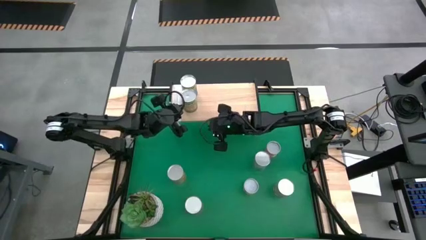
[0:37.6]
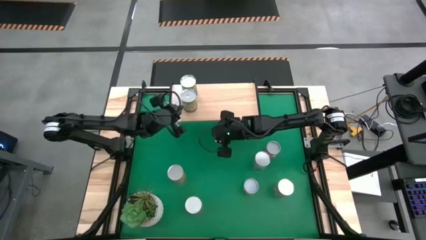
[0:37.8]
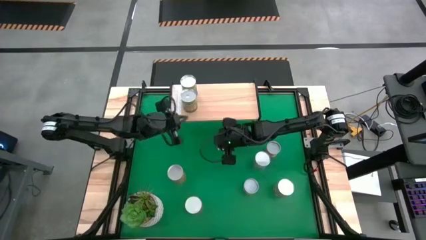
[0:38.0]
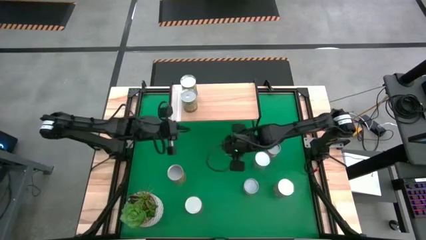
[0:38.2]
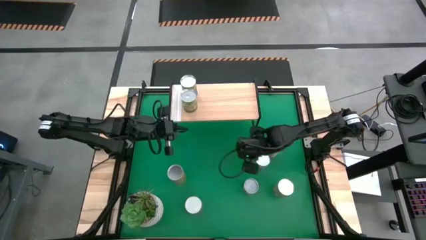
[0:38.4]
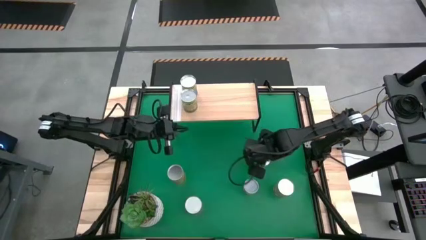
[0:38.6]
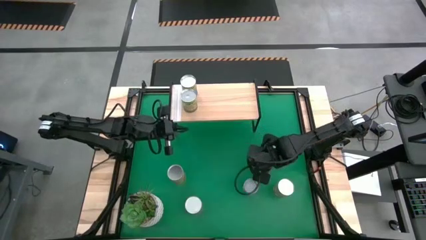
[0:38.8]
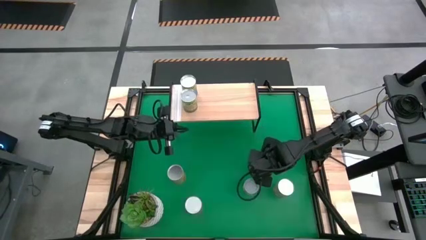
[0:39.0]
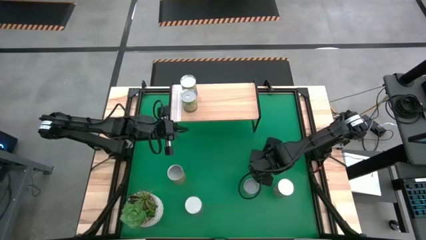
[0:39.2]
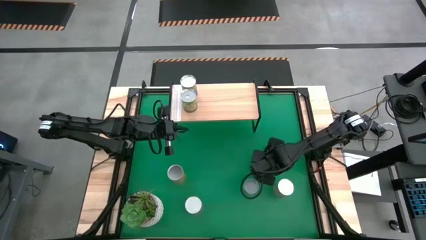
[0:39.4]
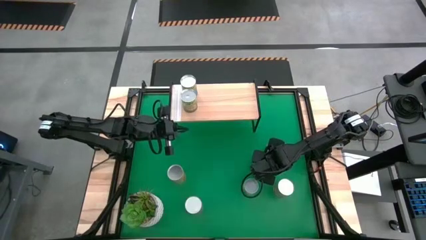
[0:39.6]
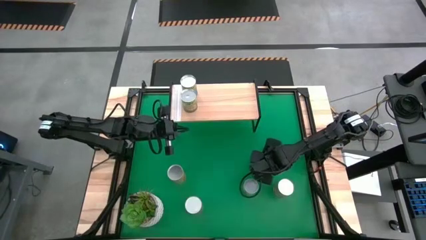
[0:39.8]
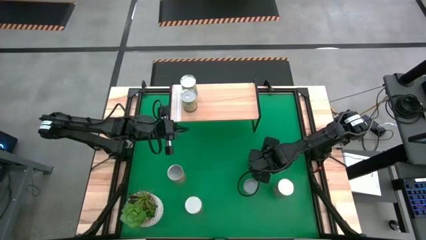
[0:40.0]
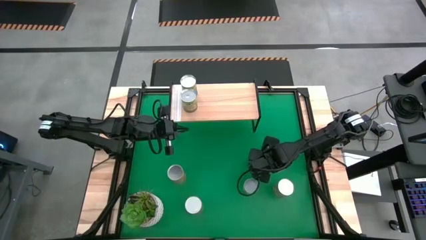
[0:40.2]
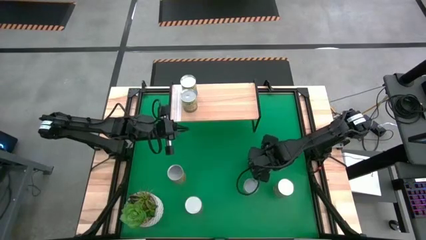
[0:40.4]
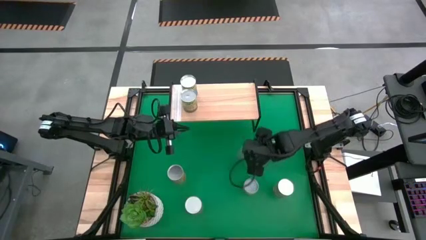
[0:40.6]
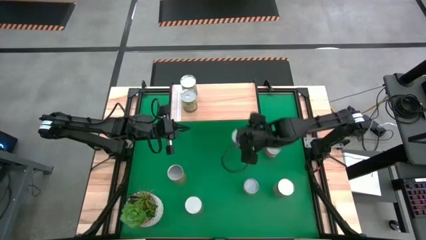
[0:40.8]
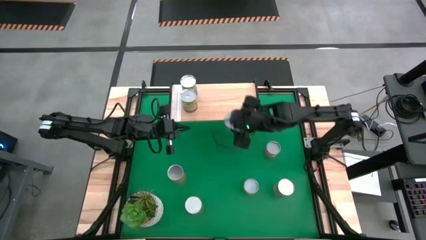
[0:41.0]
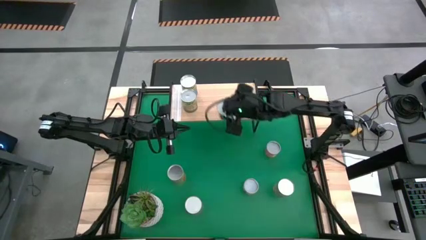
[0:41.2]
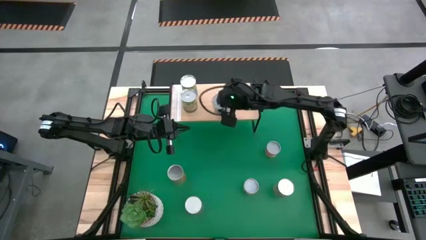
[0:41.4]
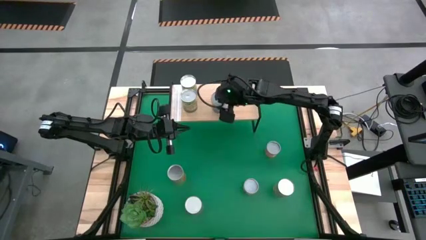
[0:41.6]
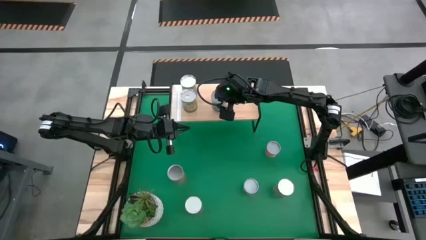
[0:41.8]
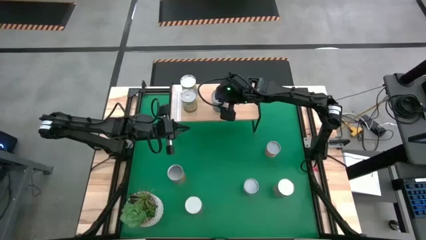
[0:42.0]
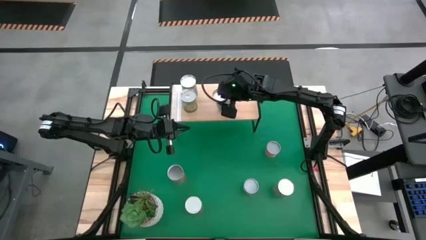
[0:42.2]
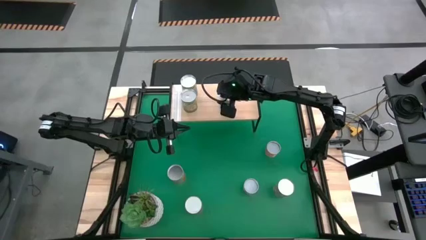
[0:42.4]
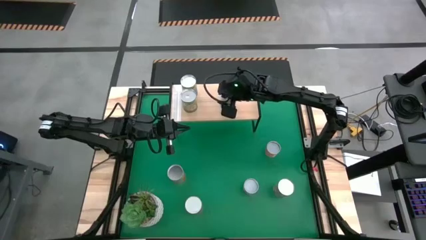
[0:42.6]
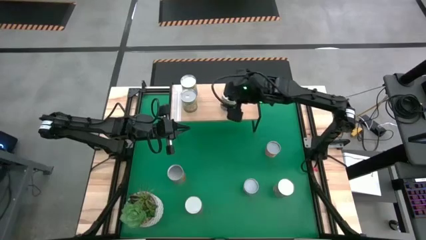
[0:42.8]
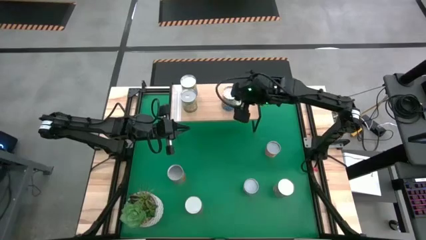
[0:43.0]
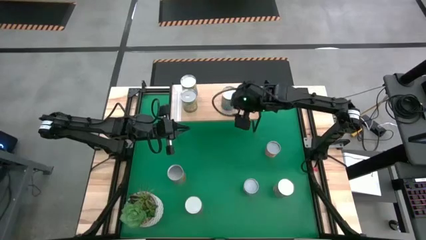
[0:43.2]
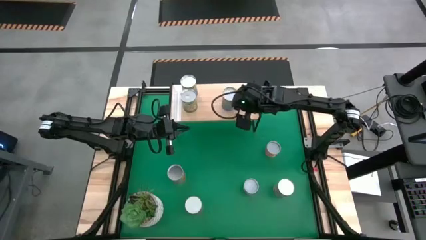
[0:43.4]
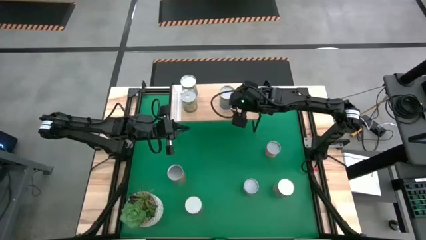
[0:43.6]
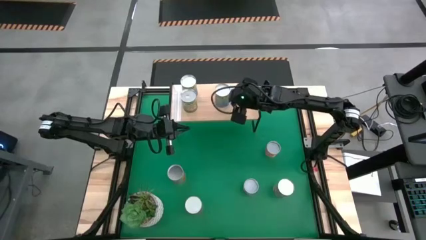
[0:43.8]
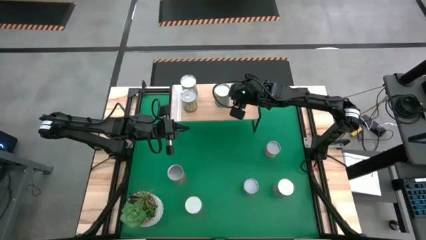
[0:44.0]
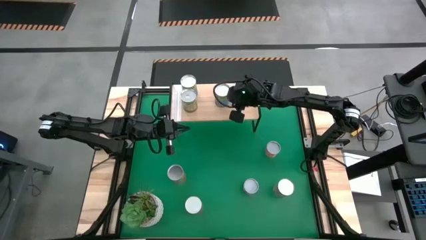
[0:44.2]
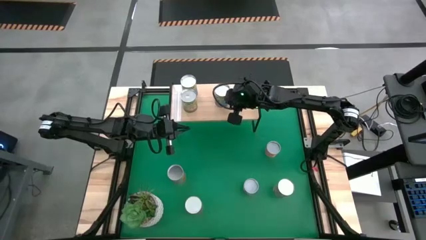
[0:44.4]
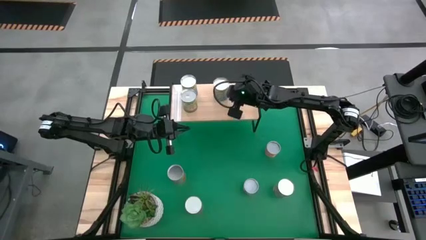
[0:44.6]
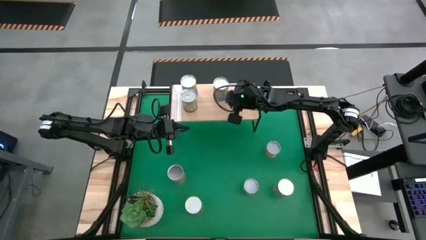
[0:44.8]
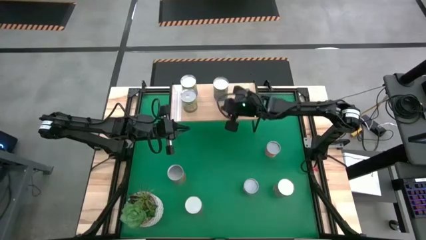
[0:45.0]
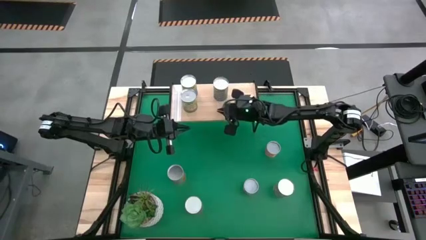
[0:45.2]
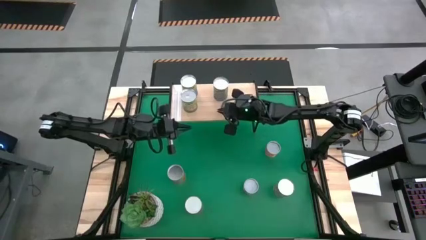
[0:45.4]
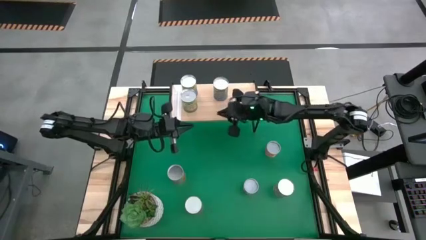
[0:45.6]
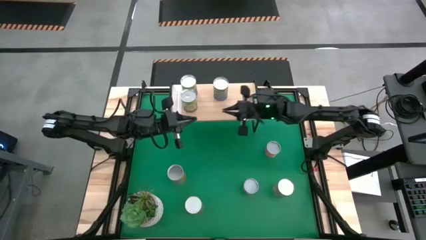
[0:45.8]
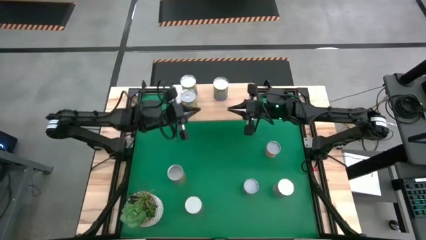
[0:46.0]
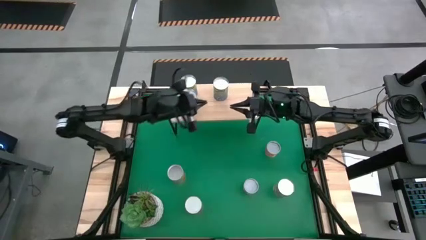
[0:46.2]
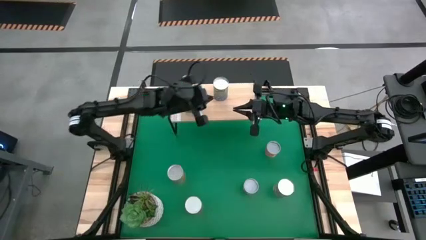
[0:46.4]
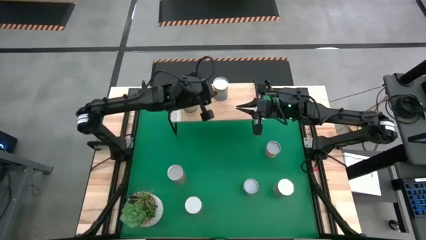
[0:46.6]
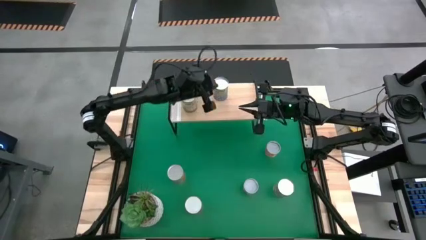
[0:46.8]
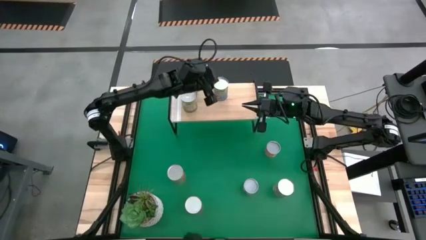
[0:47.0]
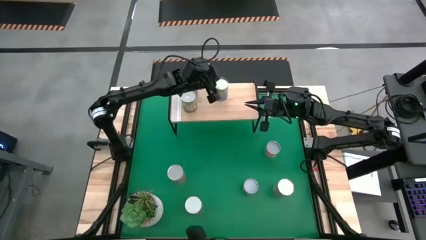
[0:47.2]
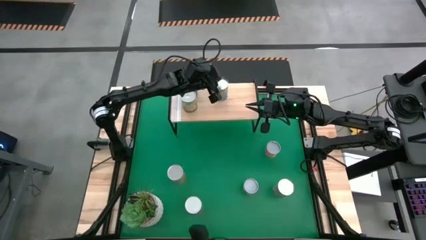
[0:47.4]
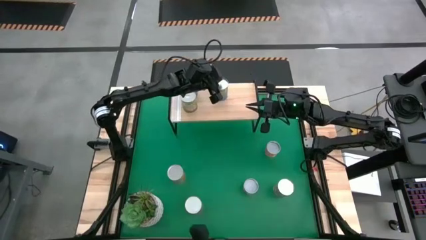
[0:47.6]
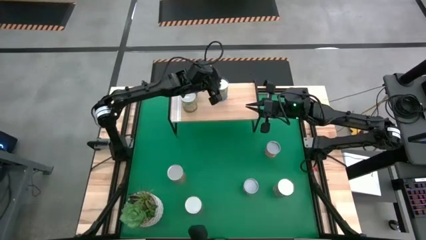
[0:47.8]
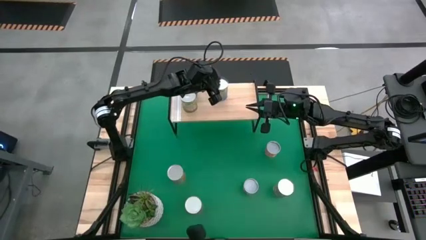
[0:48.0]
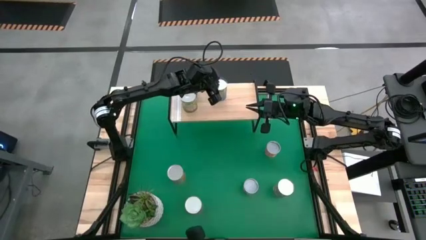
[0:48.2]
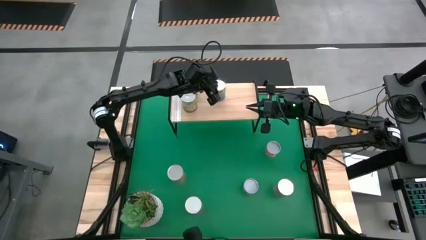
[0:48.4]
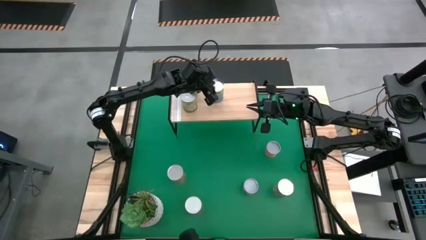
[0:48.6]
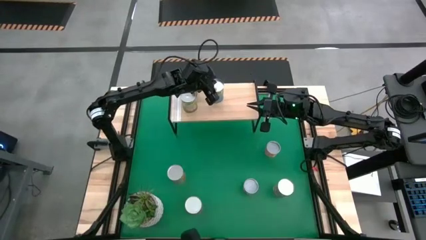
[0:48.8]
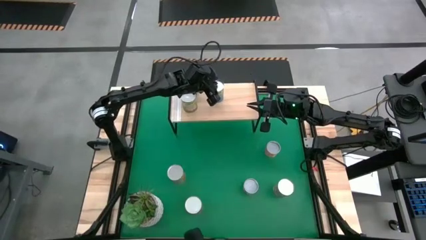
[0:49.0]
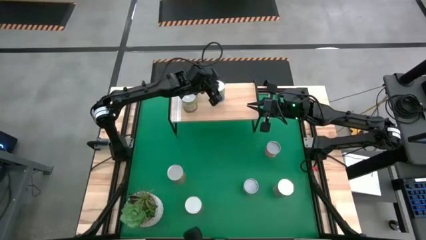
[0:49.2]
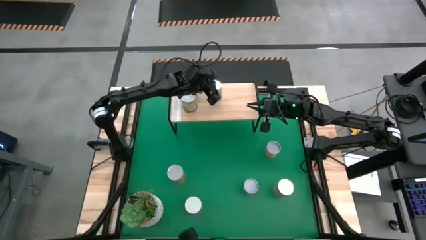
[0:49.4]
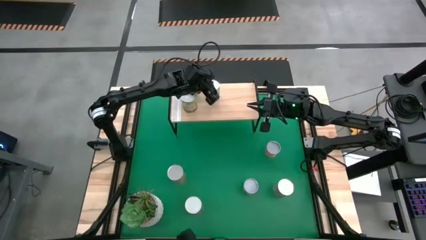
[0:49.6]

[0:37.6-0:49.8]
Task: Pick and place cans onto a shelf
Put the canned cherries on the shelf

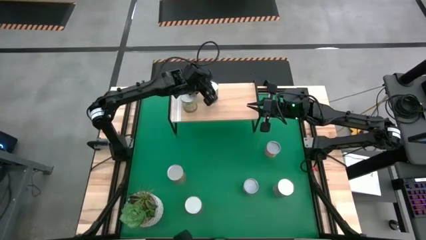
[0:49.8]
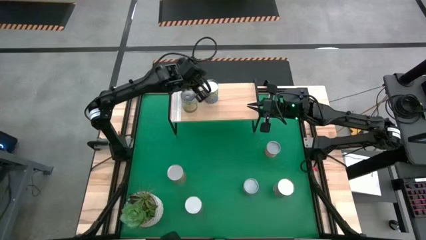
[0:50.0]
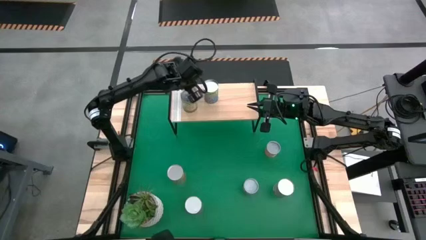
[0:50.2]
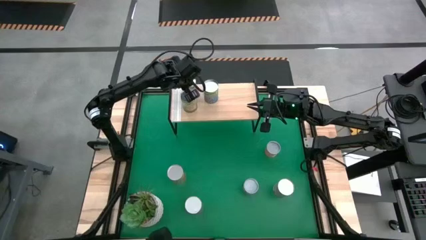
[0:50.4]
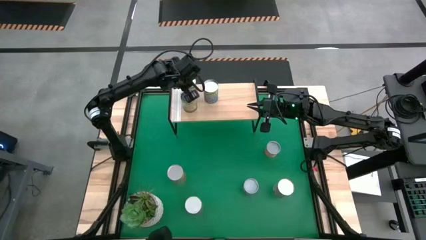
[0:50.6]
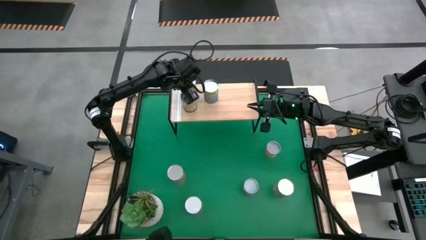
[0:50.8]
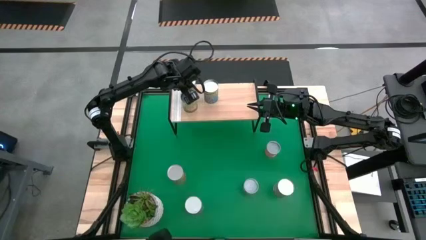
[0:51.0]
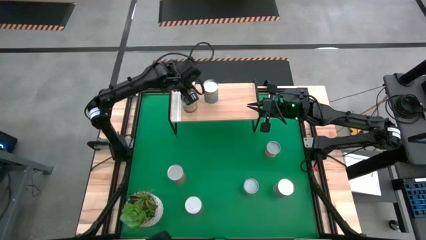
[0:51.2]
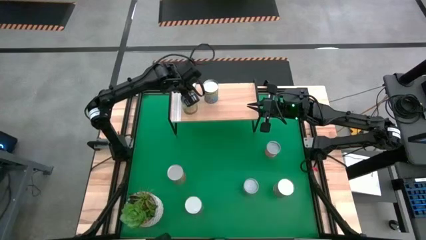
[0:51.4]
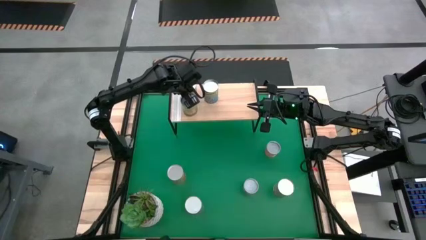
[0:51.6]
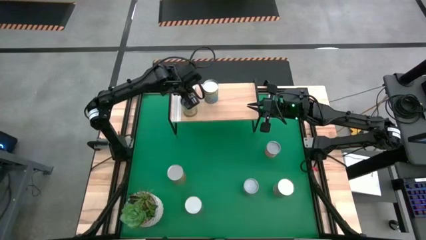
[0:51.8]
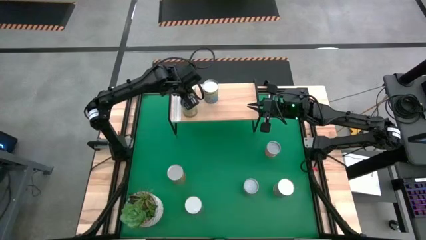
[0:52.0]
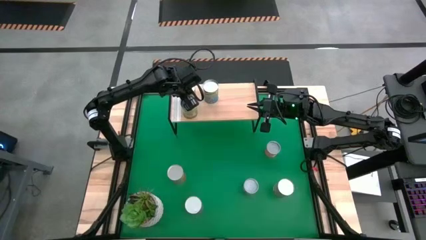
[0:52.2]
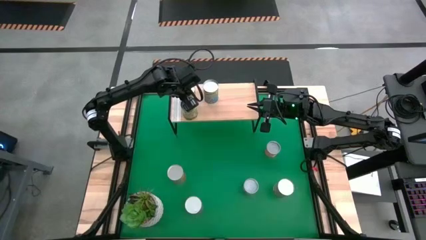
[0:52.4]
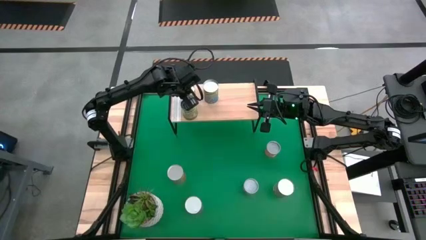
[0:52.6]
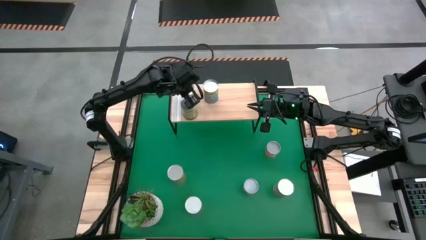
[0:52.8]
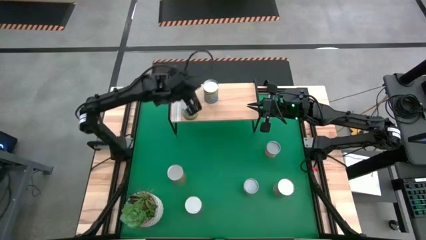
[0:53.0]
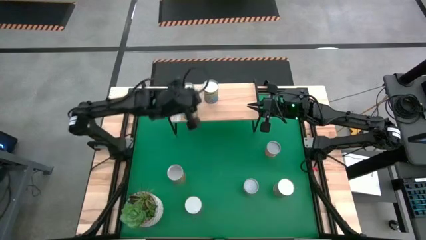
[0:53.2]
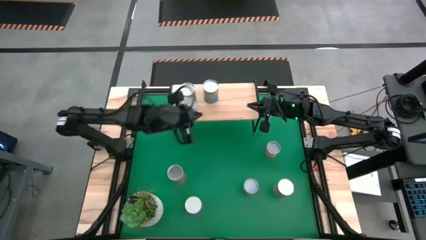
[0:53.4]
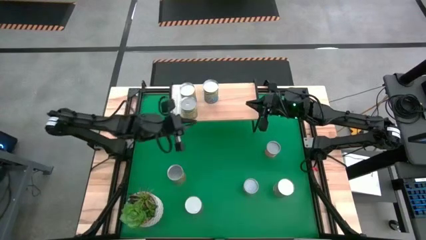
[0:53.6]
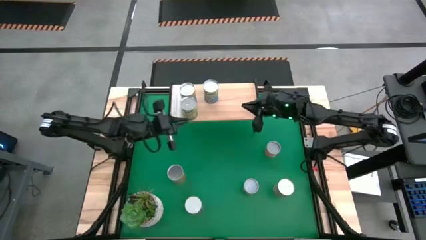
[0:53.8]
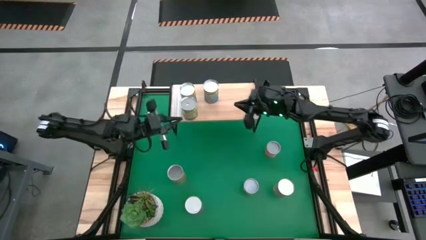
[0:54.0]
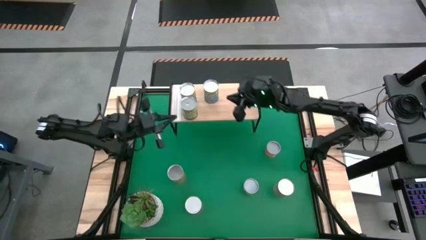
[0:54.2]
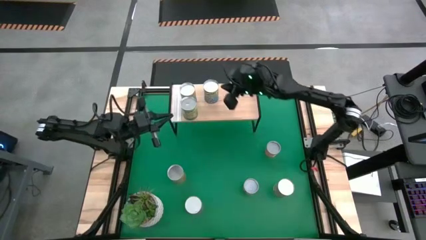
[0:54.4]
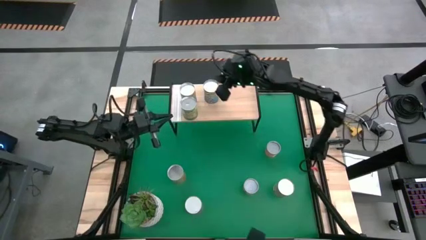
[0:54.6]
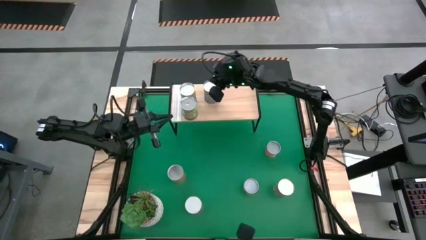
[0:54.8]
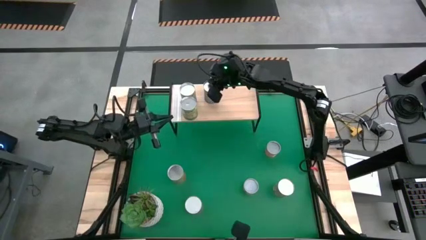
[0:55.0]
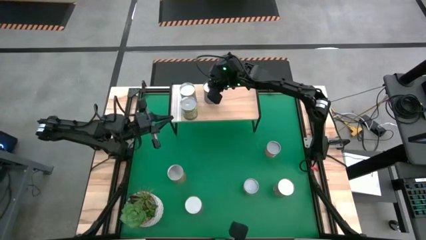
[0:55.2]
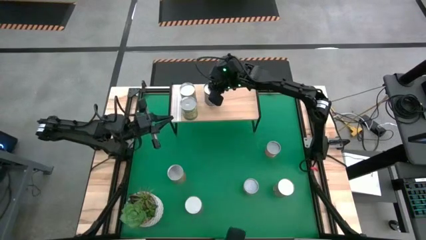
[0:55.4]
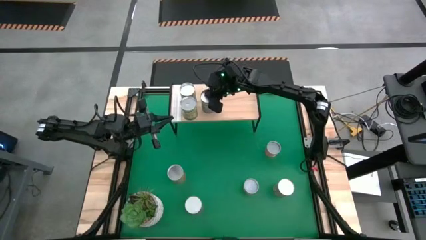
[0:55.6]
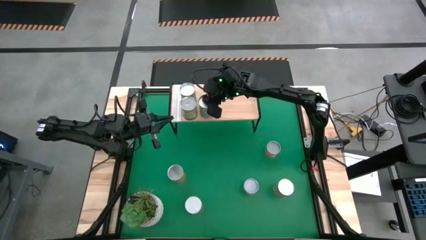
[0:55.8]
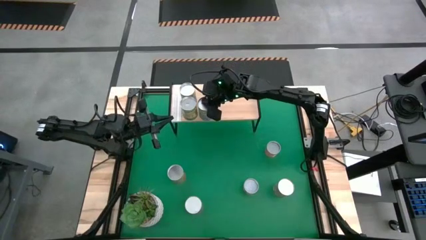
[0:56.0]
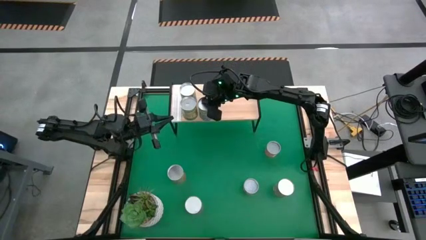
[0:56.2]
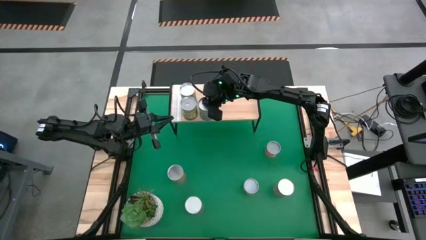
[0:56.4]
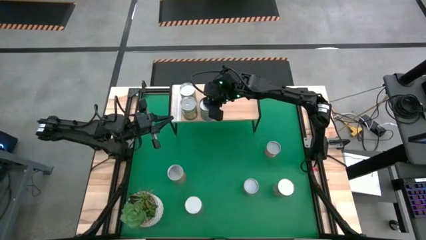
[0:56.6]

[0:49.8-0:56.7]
Adjust the canned goods on the shelf
